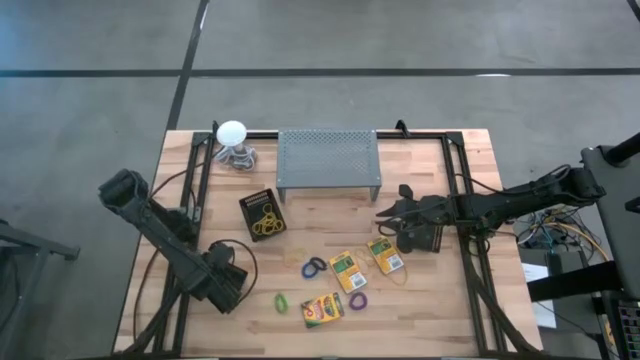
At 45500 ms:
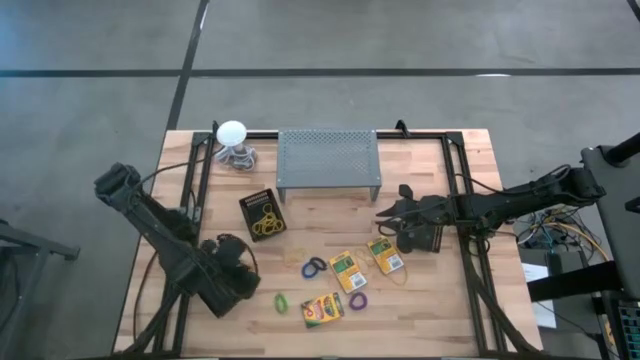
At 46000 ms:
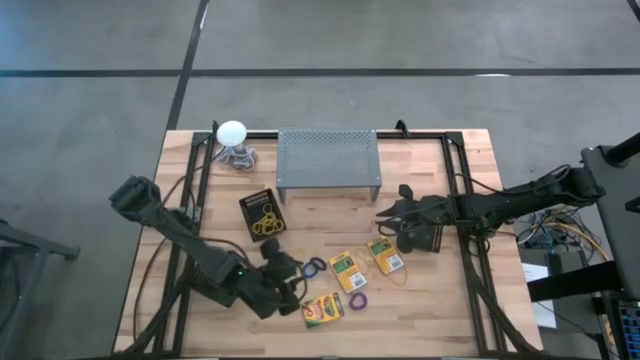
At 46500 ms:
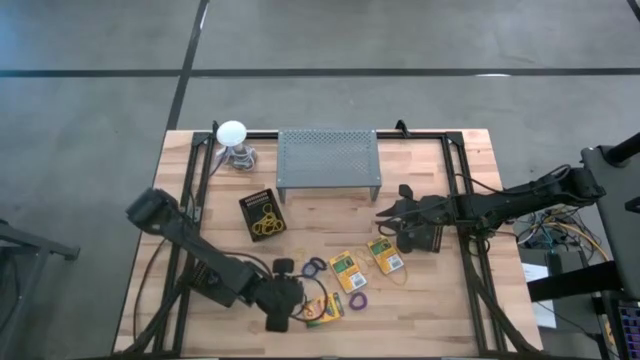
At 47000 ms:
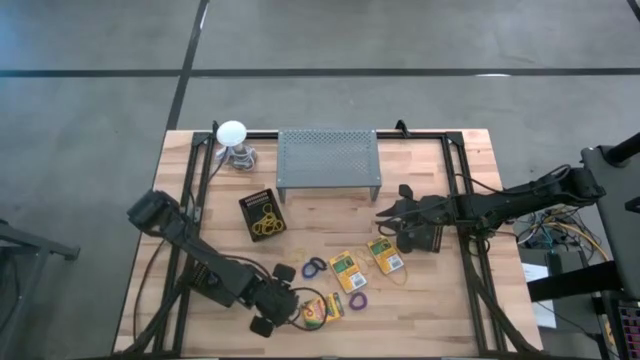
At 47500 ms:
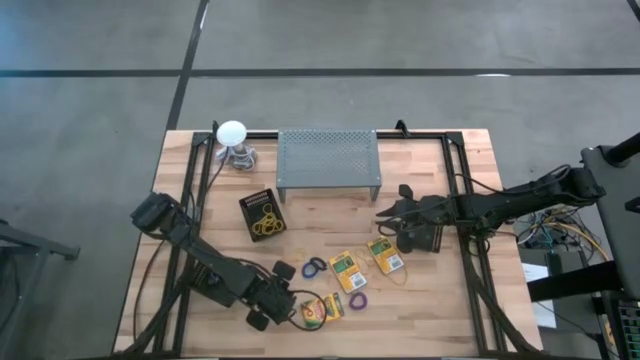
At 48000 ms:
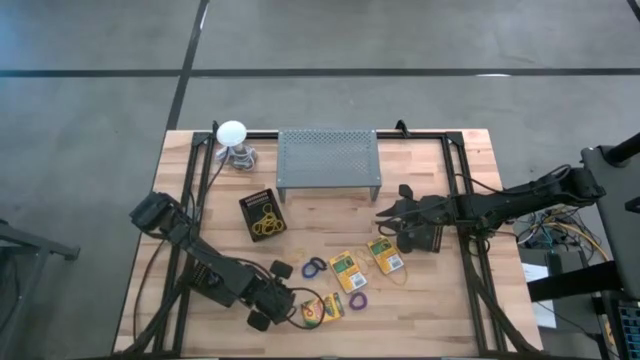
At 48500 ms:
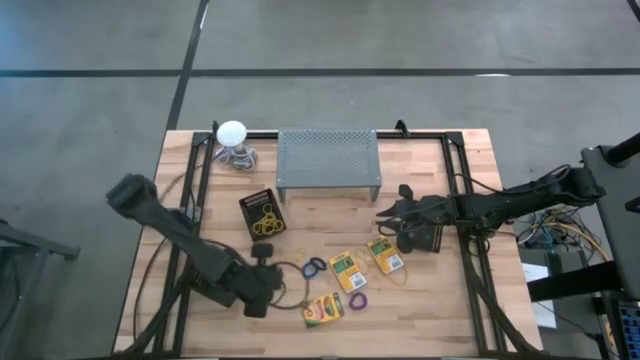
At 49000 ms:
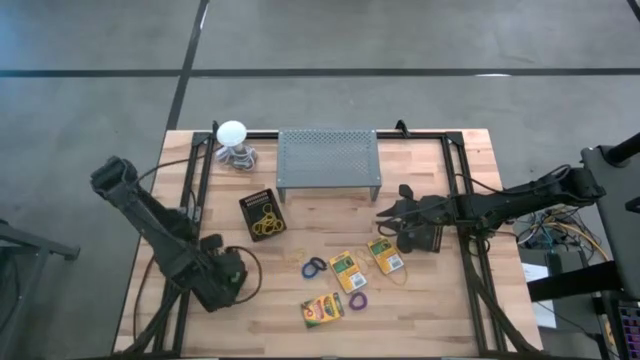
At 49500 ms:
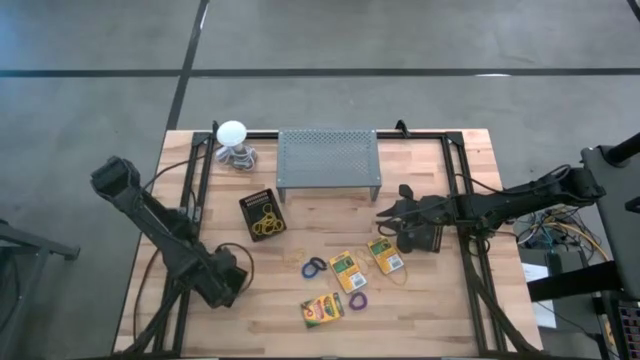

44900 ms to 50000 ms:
Task: Pick & Place Office Desk Supplies
Put the green spring keychain into the bottom black bin

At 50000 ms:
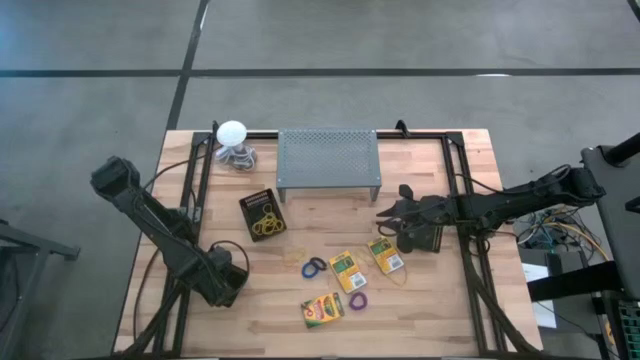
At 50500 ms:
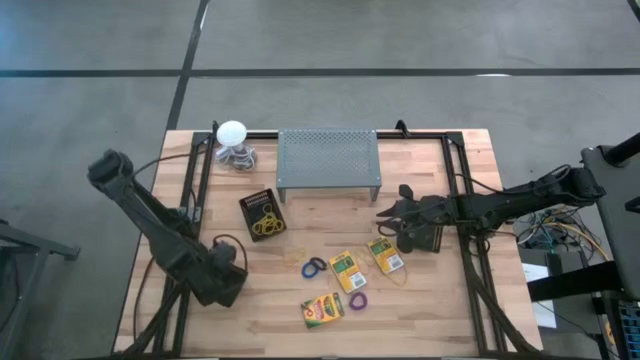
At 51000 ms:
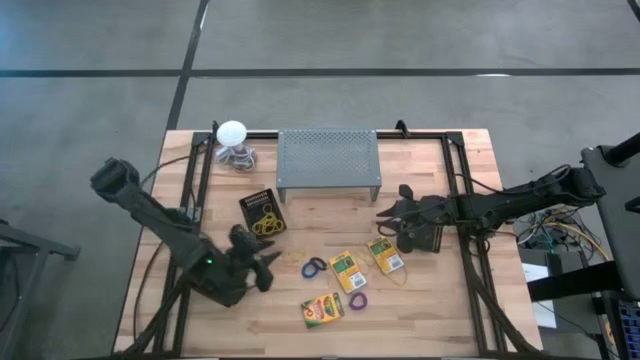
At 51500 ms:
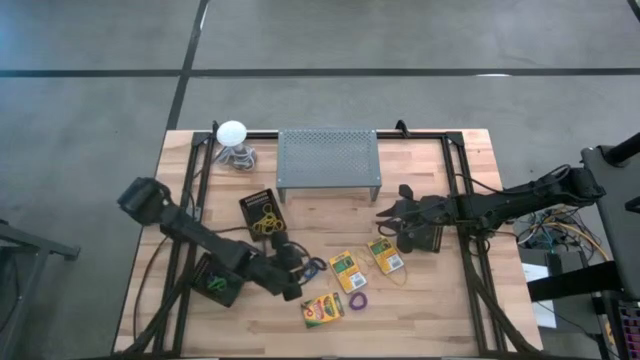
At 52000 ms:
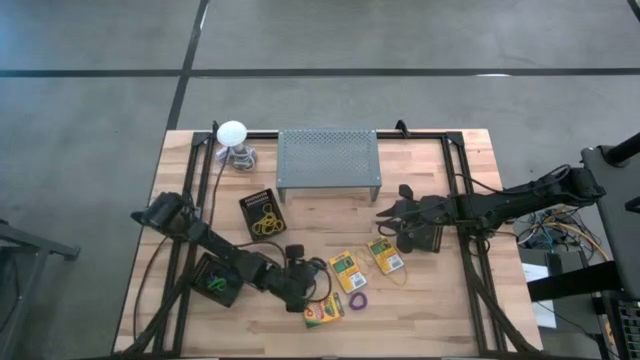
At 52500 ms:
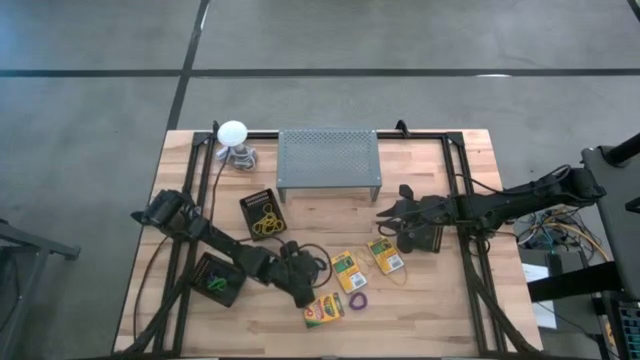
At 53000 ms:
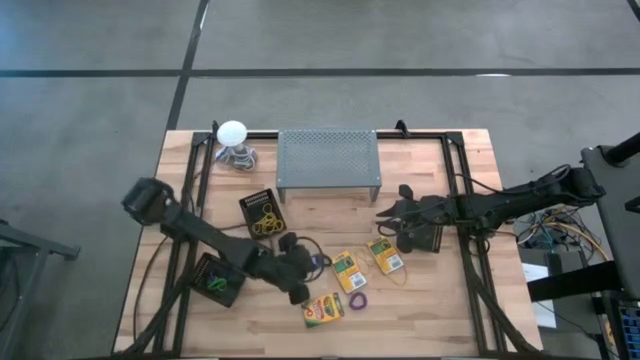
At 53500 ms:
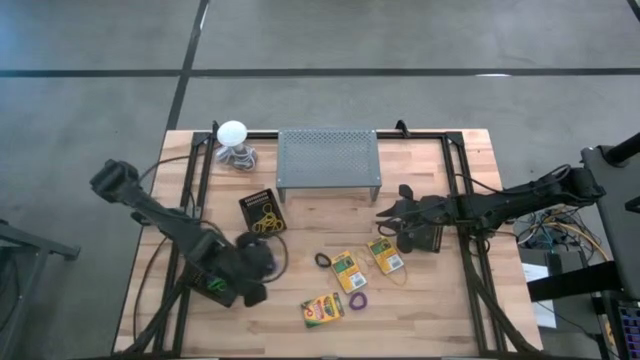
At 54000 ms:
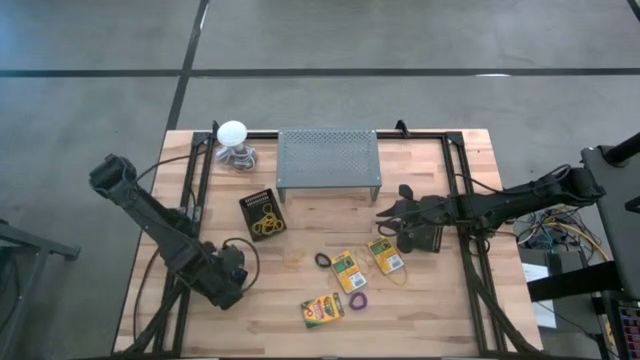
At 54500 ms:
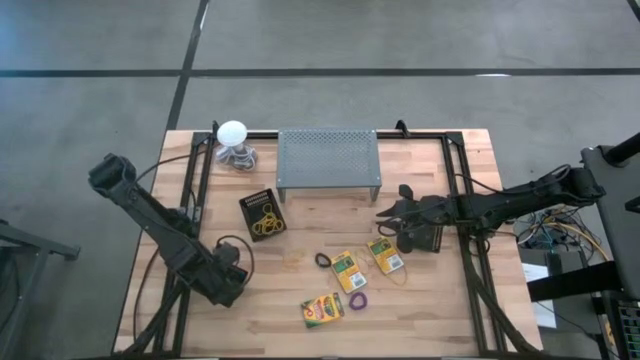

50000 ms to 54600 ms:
Put the blue spring keychain into the bottom black bin

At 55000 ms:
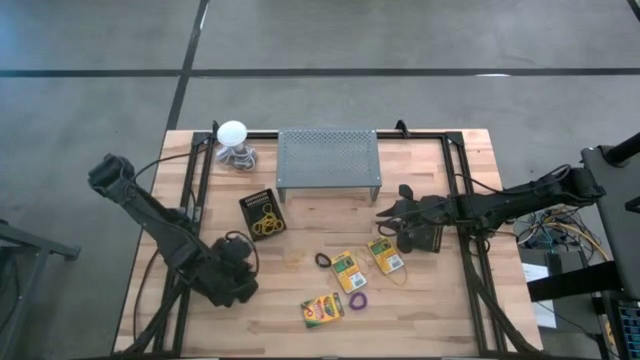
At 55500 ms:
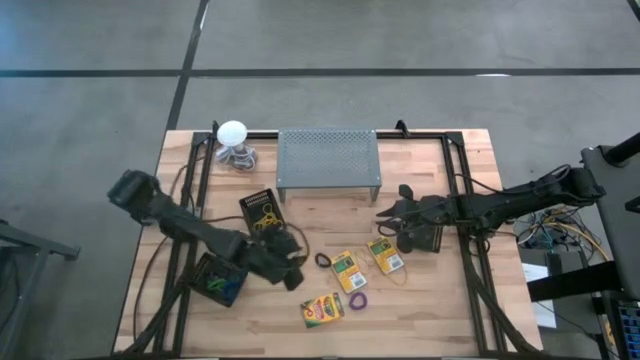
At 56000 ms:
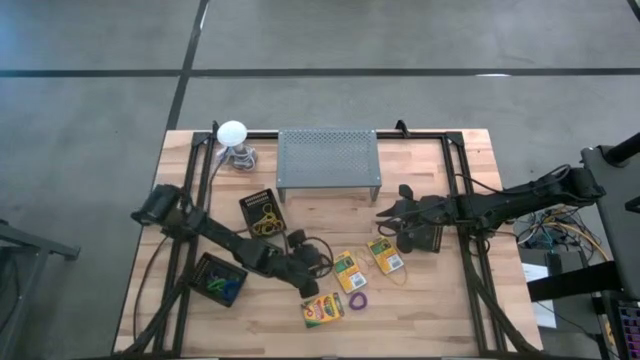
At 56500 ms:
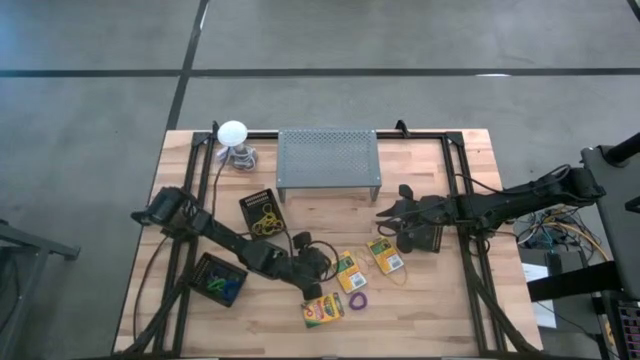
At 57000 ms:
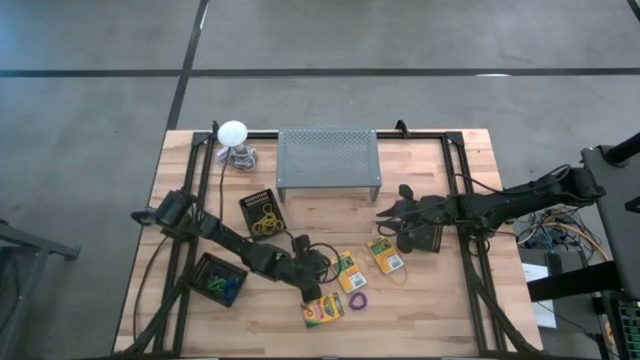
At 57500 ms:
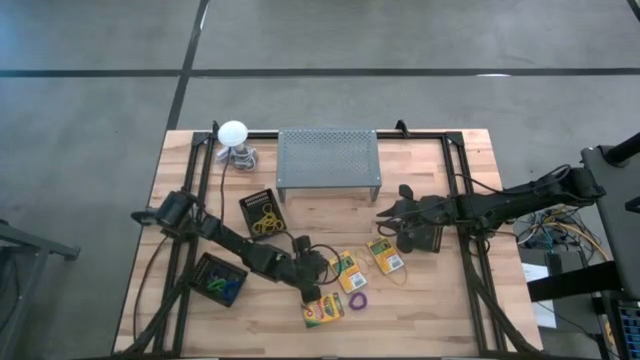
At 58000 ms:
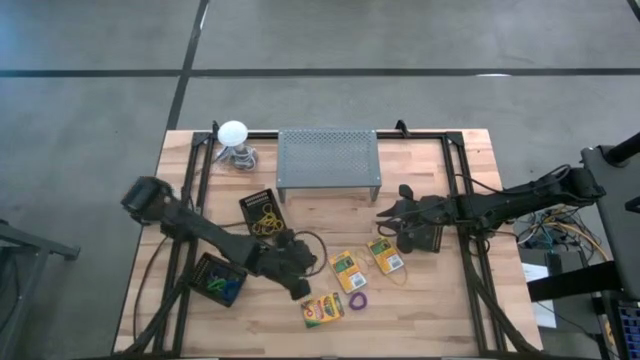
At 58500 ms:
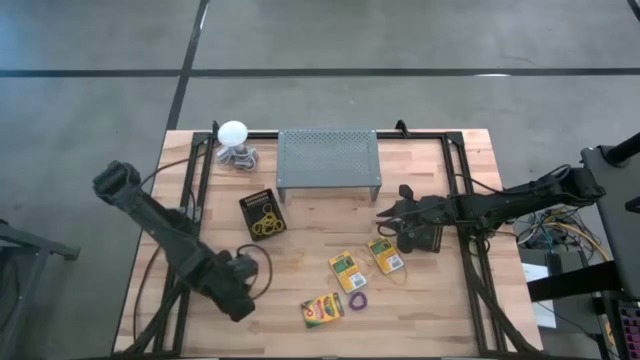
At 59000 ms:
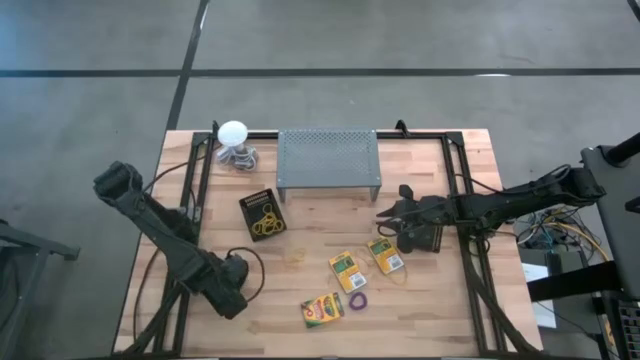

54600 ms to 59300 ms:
Put the black spring keychain into the bottom black bin

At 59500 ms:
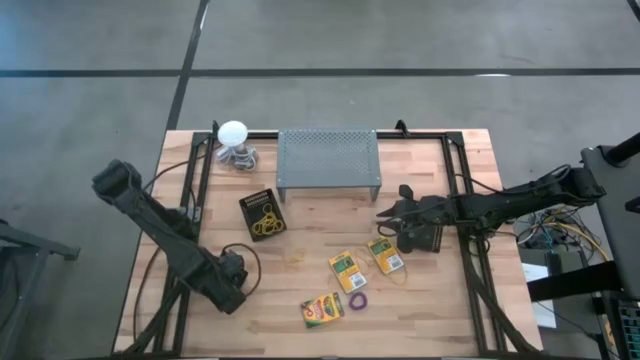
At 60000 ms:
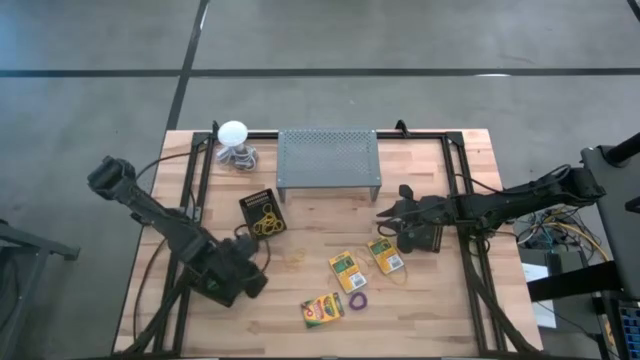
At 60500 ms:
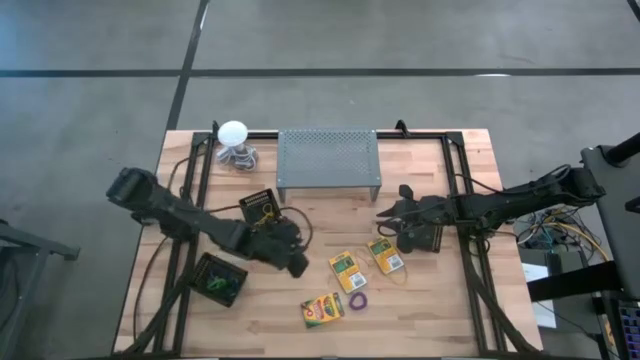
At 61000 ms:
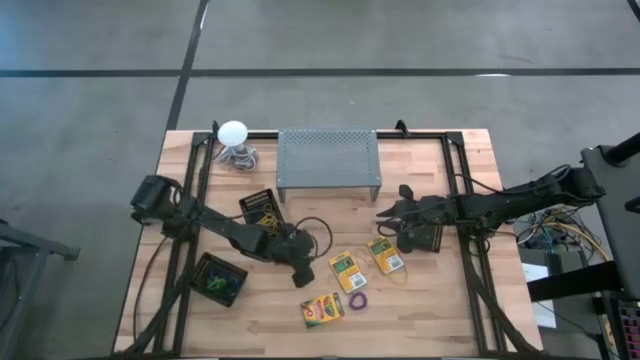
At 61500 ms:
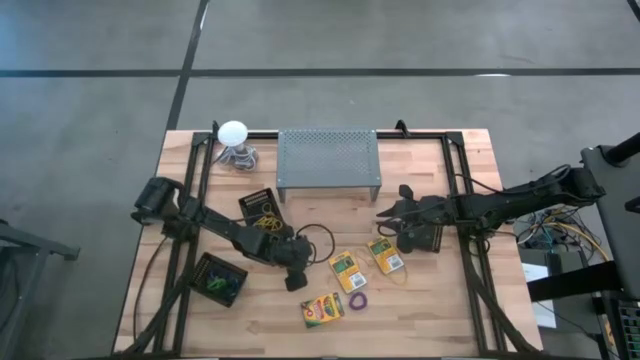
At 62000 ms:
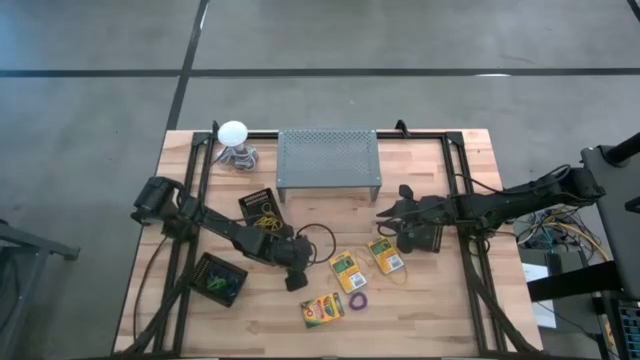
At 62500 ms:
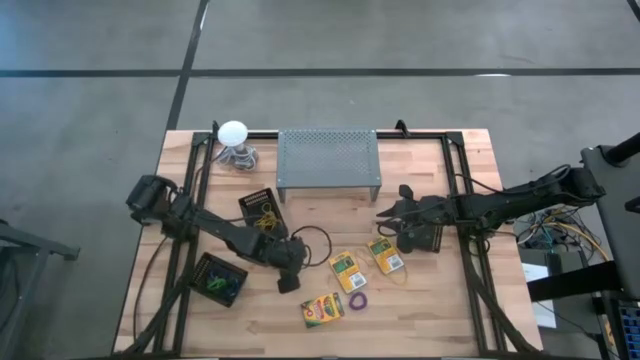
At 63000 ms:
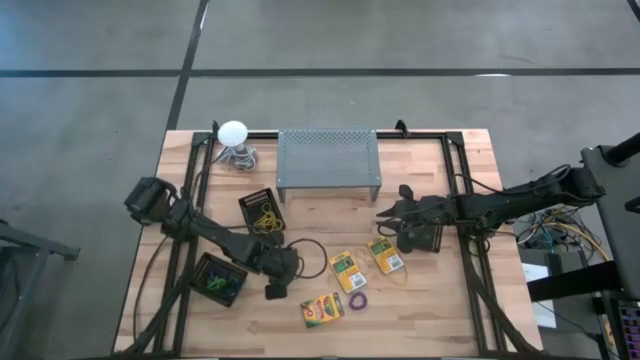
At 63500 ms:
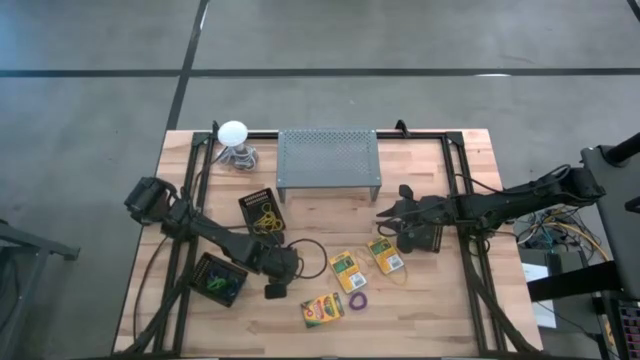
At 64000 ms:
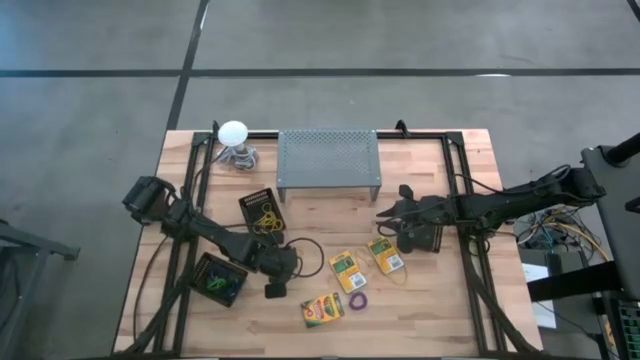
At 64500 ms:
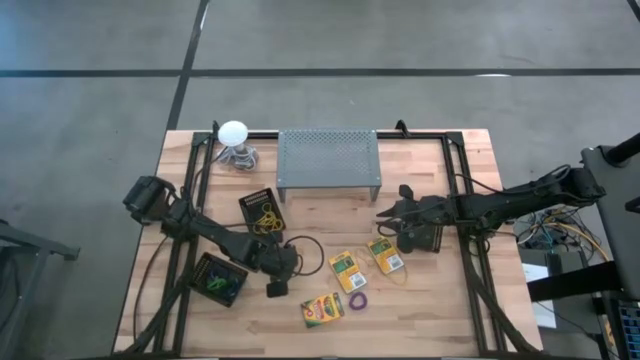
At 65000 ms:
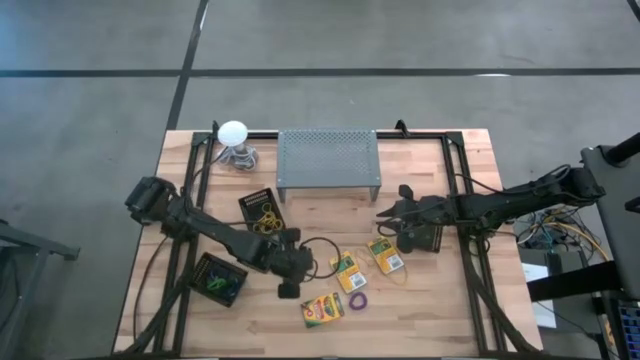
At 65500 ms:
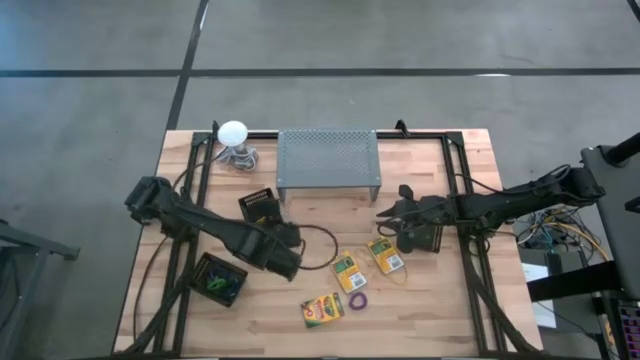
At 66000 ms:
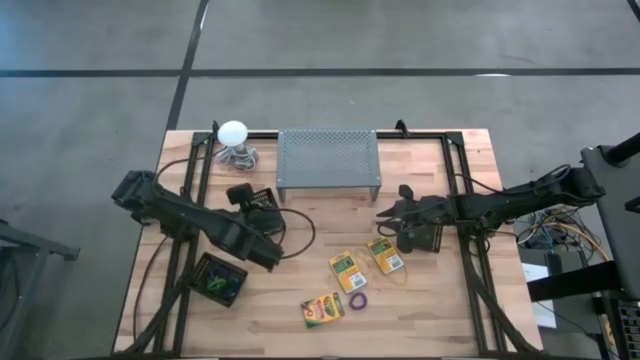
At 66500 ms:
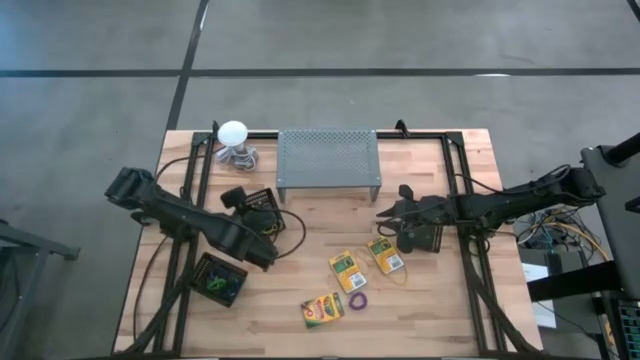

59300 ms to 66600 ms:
Put the yellow rubber band into the top left black bin
